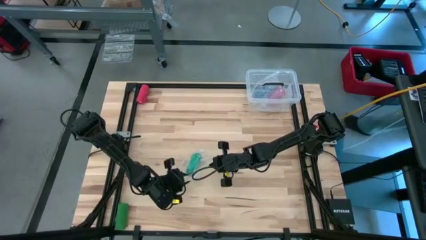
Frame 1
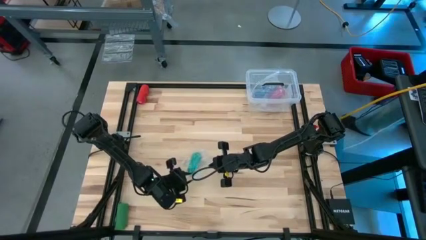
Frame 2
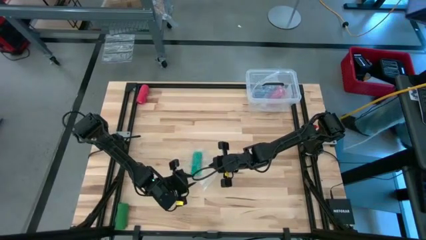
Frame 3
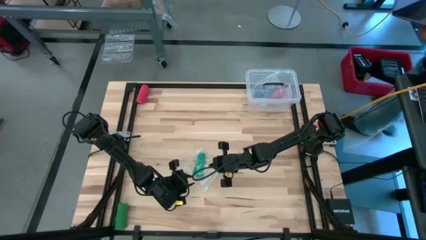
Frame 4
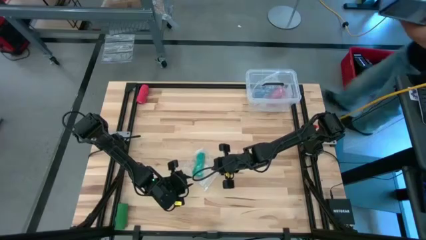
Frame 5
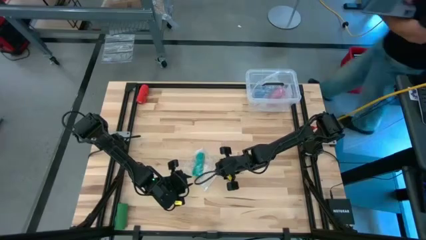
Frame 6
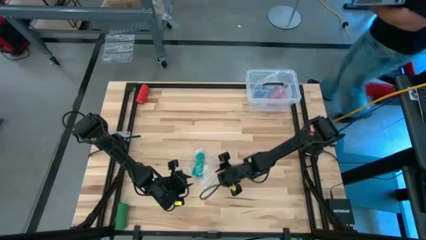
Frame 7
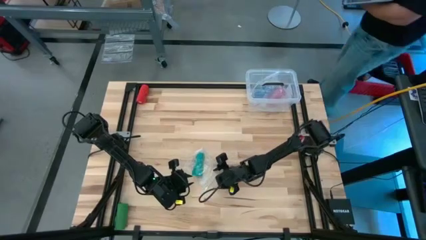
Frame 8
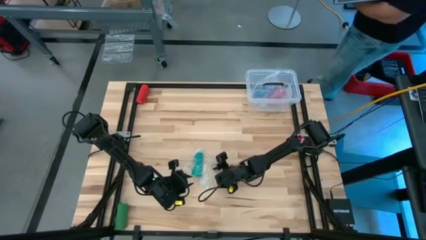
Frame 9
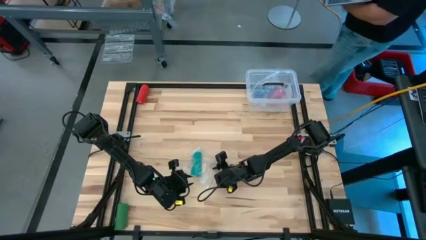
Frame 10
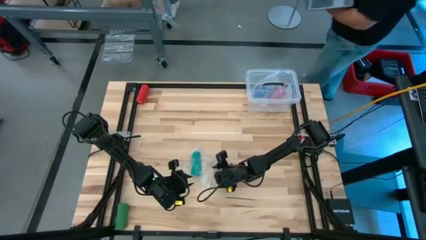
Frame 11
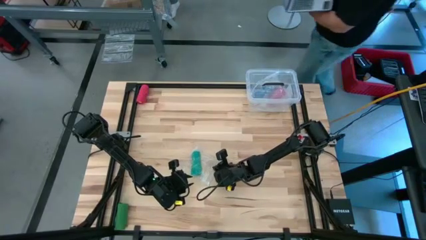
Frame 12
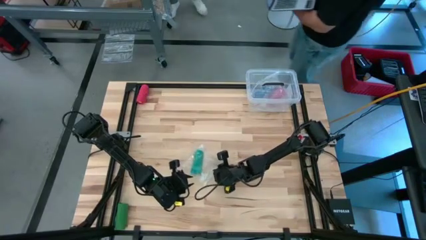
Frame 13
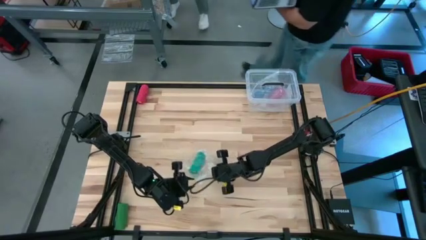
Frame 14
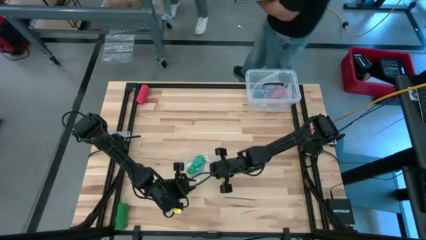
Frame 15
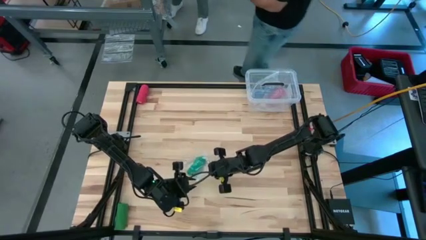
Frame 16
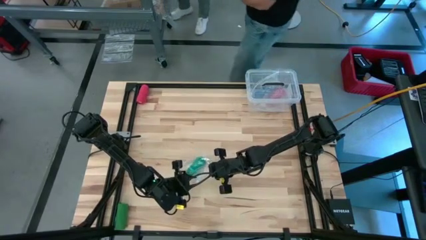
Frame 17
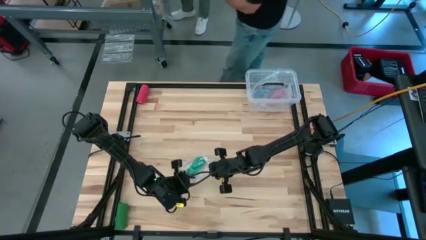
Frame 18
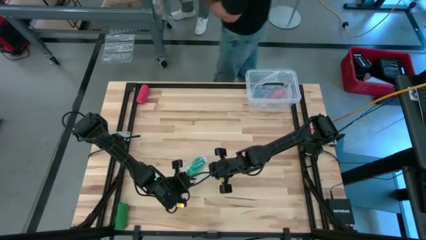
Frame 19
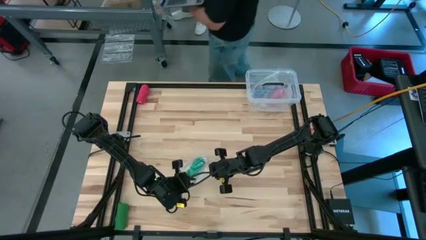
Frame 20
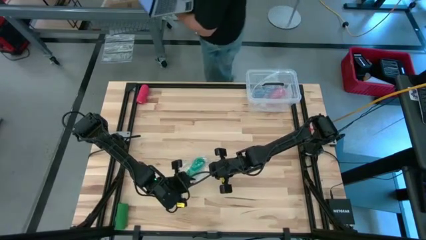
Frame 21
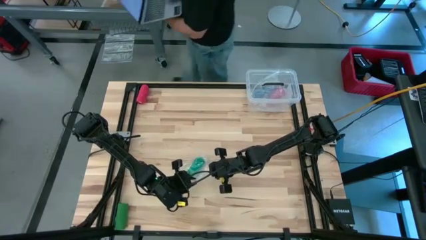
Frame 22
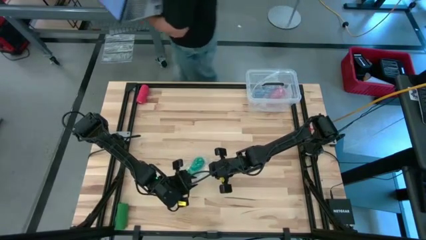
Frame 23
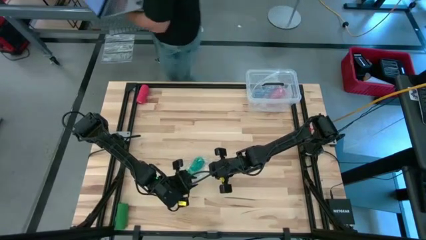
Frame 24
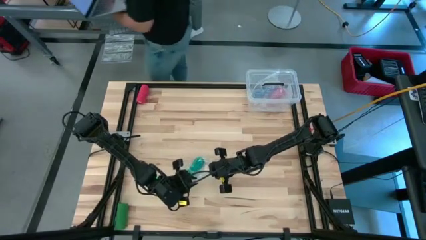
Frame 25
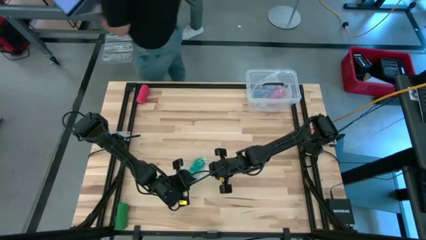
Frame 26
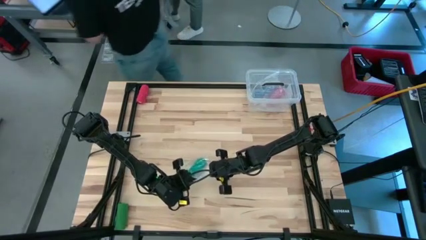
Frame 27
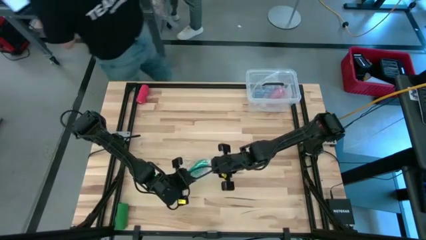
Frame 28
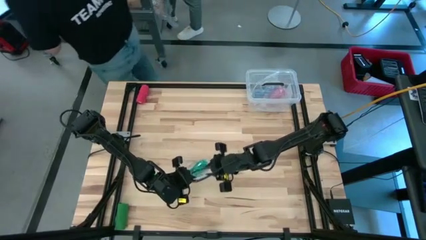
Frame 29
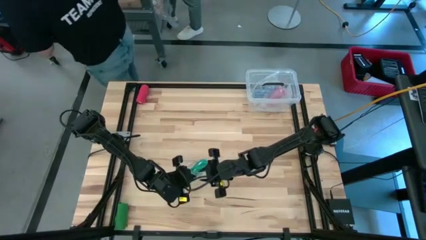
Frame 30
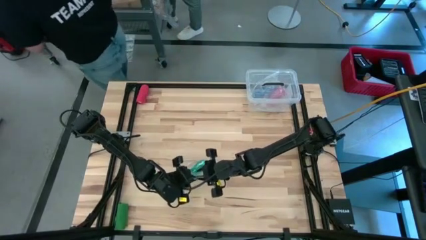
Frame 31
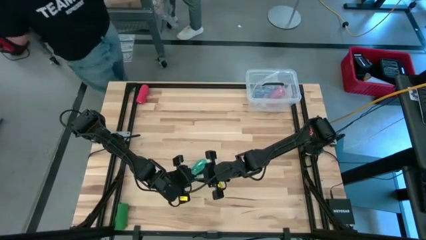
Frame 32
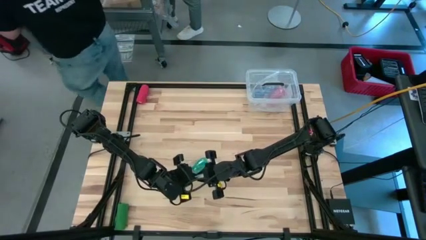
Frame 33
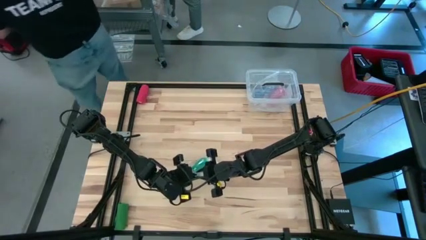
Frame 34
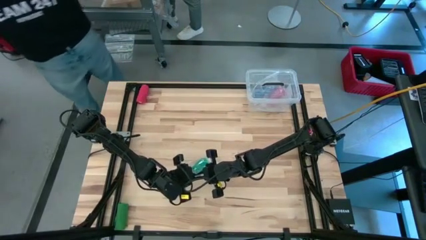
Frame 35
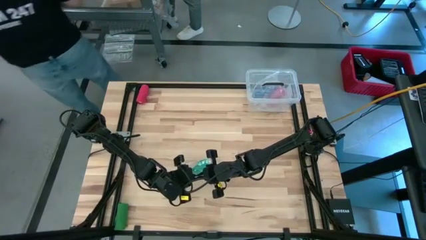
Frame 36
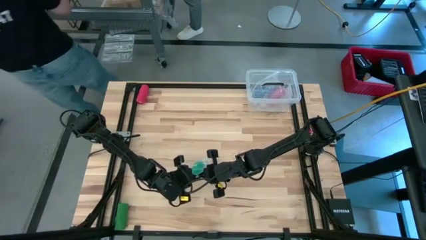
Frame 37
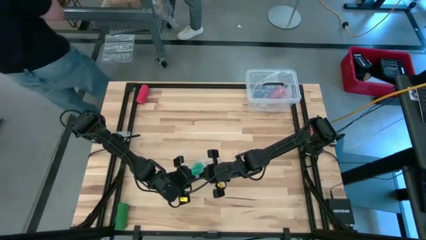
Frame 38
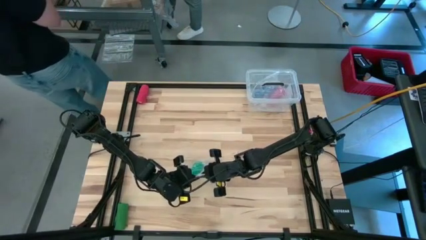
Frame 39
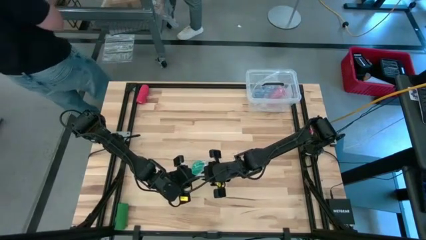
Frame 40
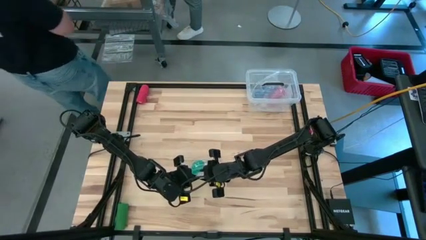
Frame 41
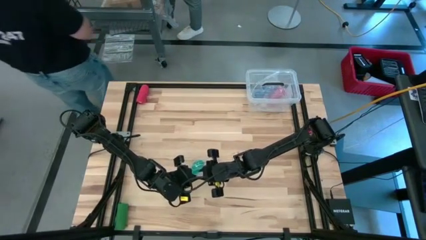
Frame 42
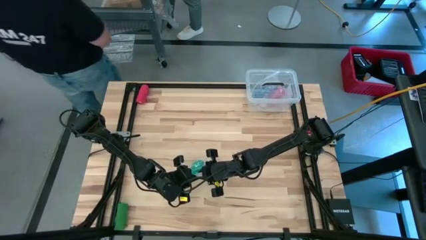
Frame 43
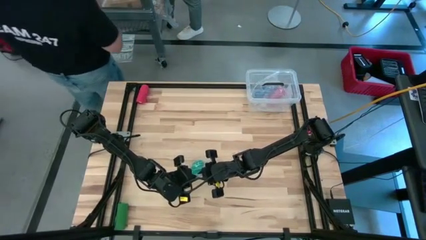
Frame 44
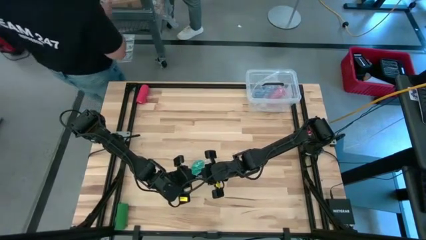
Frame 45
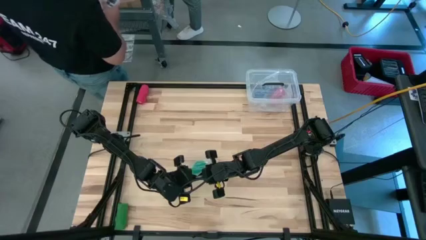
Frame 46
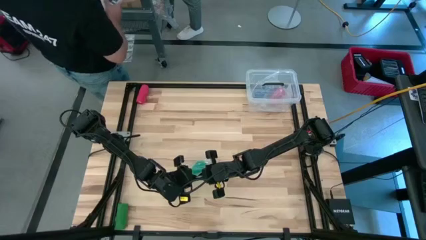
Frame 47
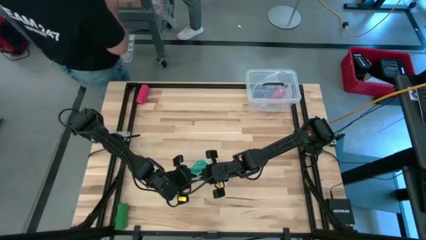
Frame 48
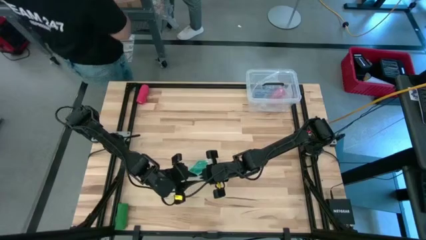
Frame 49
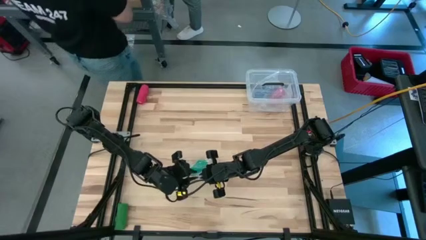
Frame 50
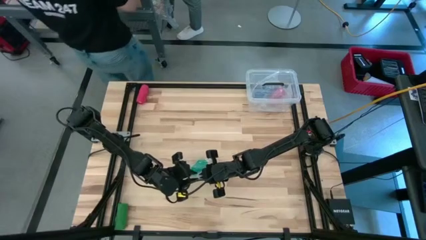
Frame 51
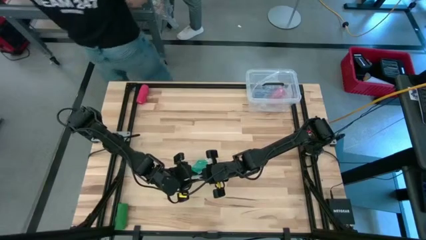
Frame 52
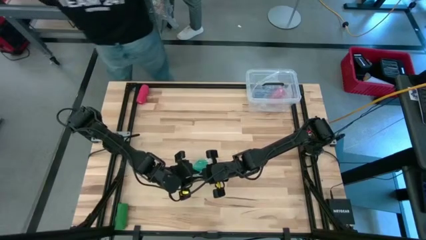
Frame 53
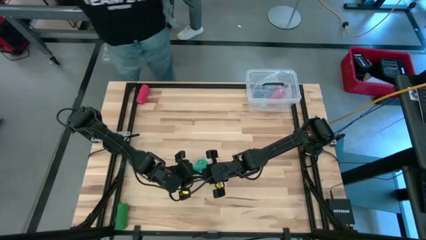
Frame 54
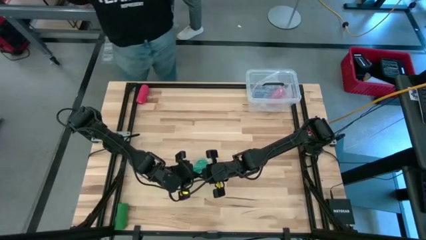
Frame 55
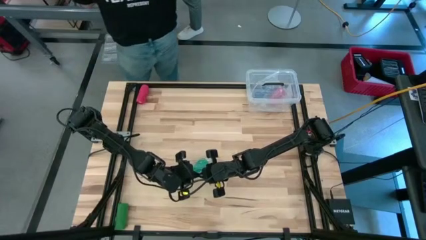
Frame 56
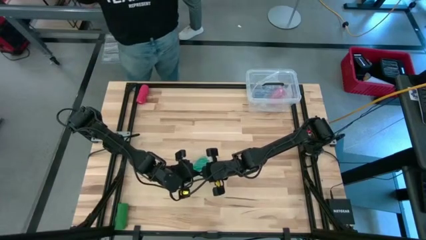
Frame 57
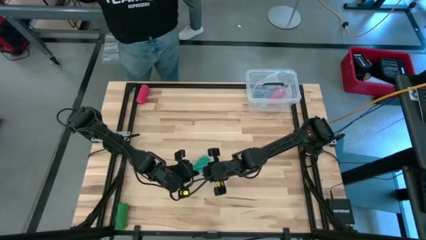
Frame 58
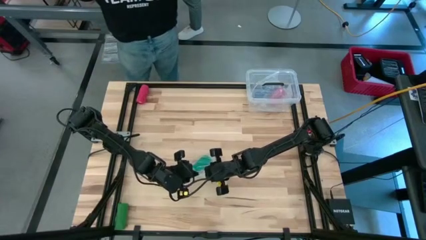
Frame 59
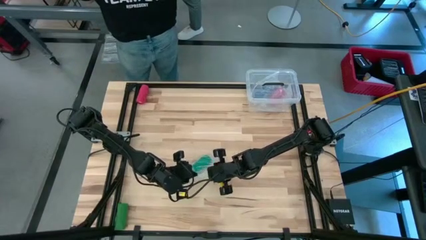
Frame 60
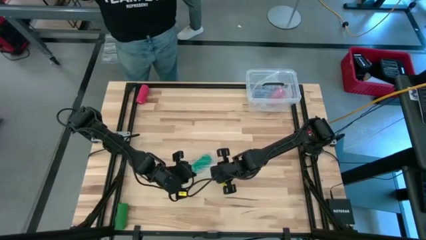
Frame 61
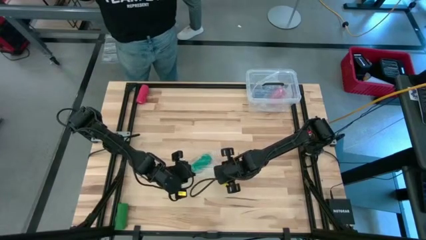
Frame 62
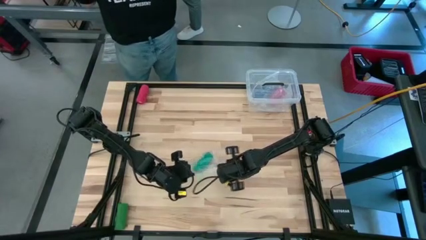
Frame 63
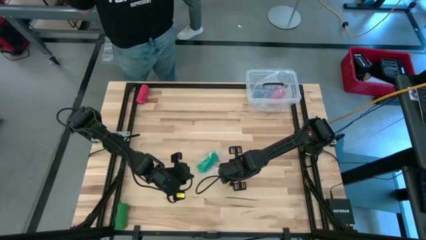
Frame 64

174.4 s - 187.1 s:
Task: Roll bandage
Close the transparent zip bag

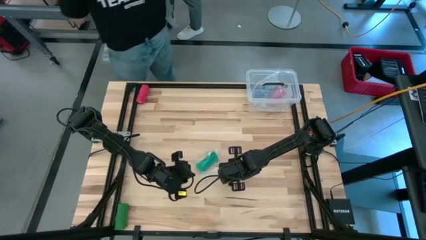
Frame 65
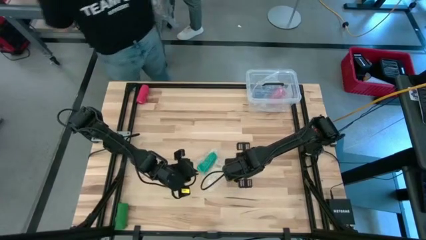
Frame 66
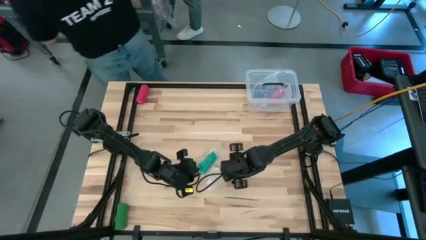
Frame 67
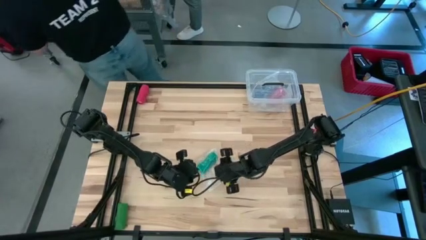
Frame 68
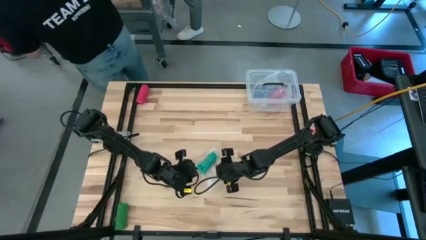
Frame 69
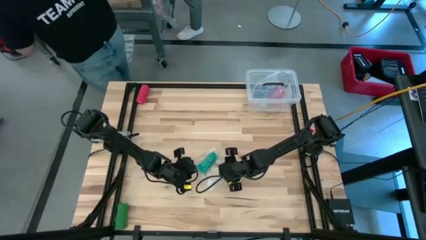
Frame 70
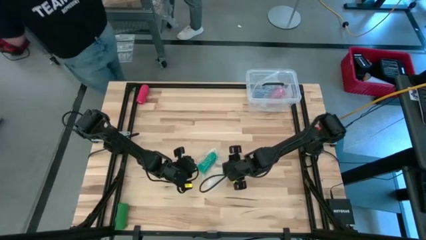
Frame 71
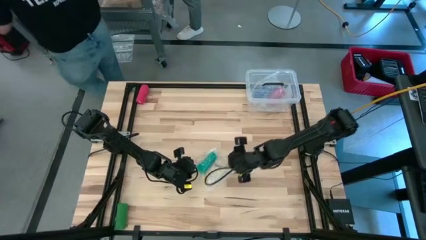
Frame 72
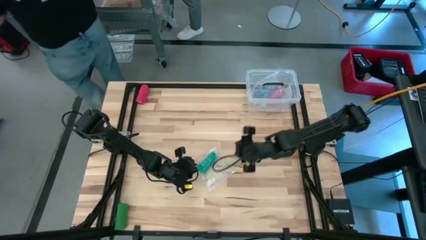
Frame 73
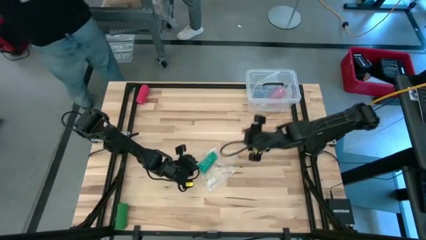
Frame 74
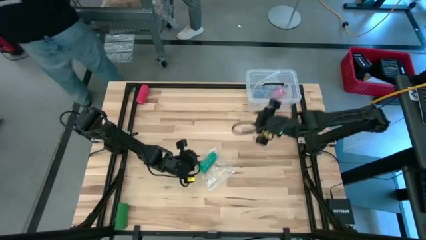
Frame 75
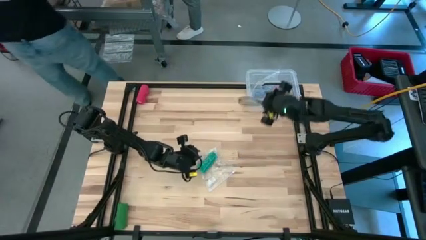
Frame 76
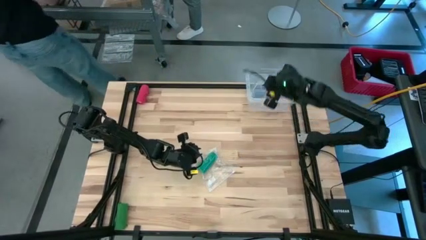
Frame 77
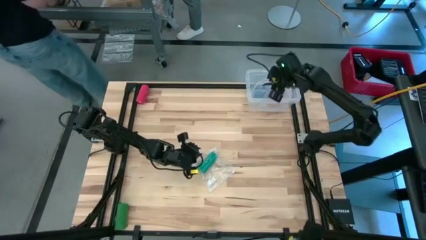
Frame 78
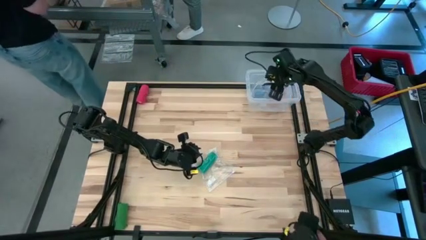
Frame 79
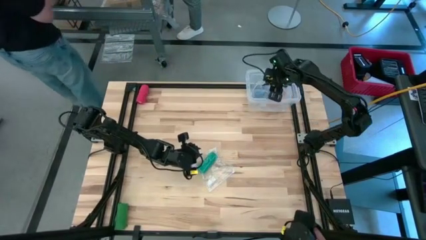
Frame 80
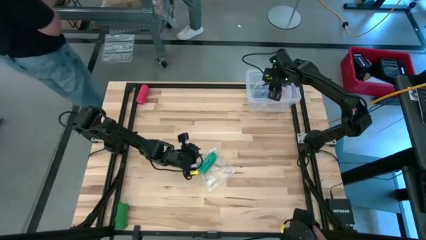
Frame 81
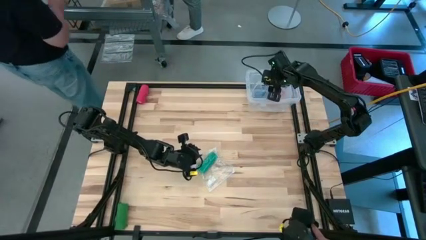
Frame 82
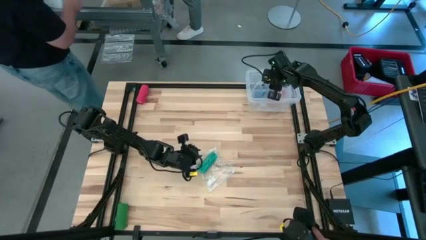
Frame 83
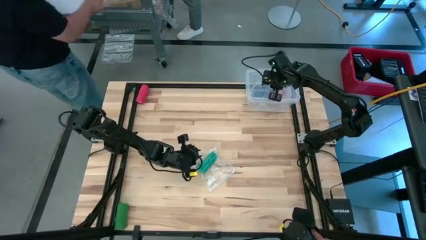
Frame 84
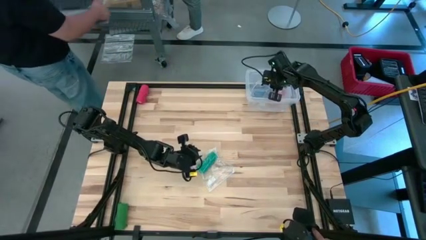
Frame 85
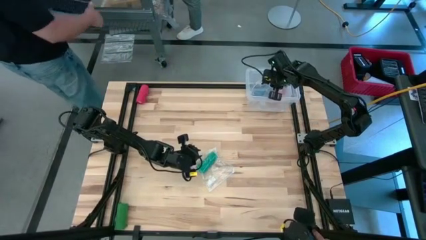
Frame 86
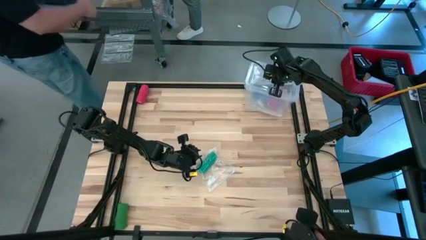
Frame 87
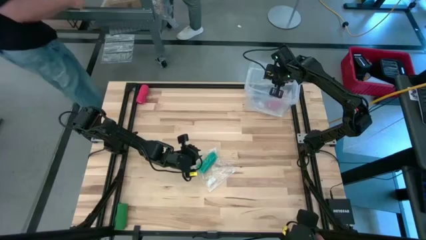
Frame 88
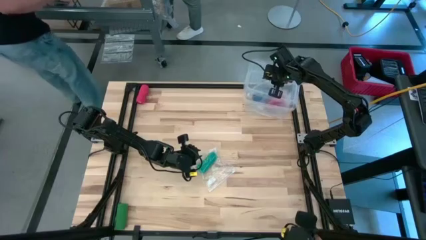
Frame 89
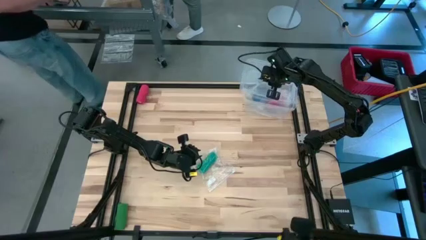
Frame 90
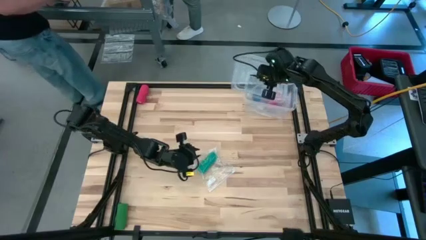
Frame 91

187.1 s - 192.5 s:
Open the transparent container
